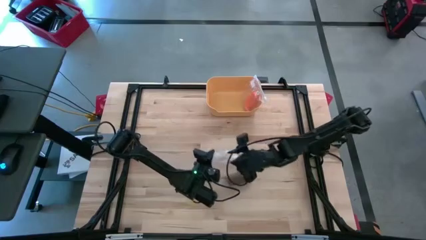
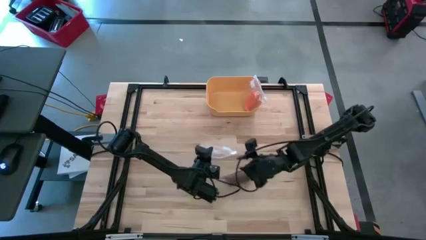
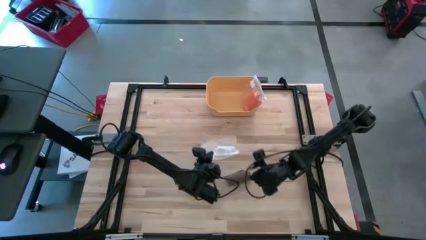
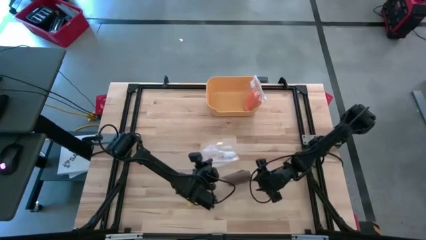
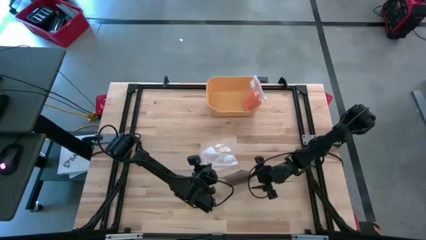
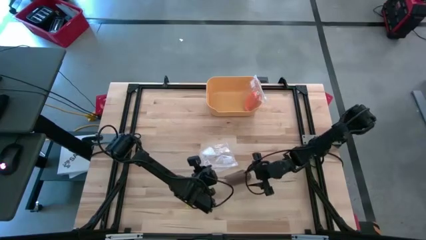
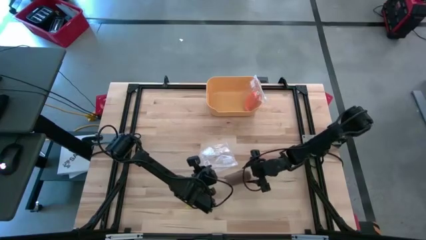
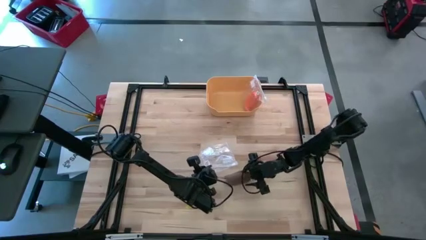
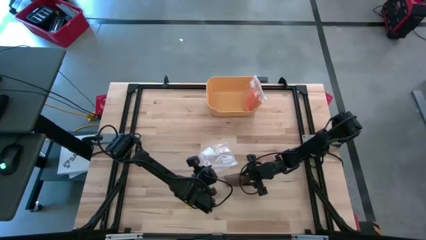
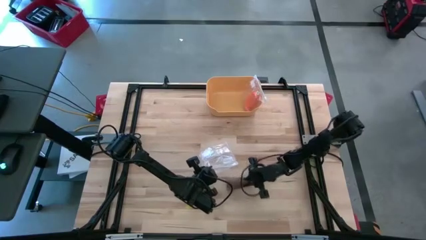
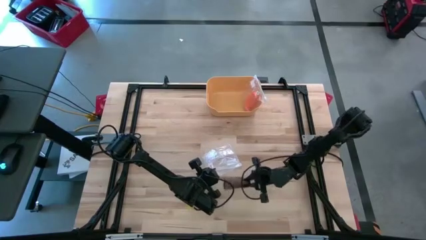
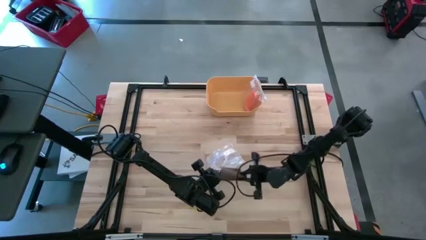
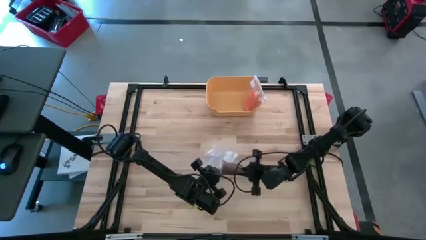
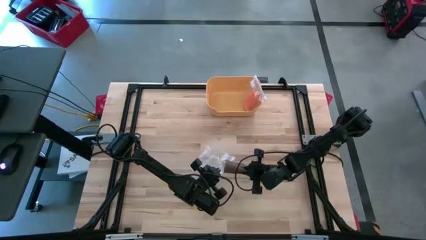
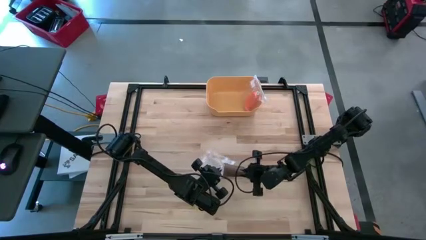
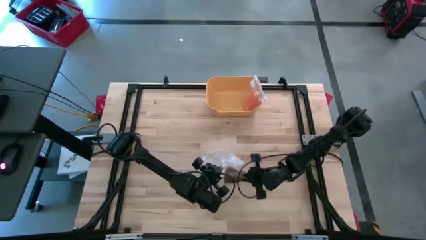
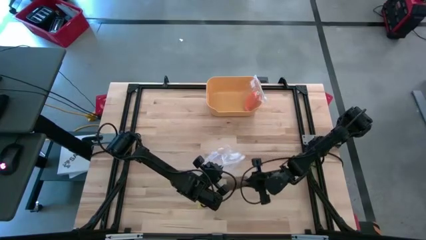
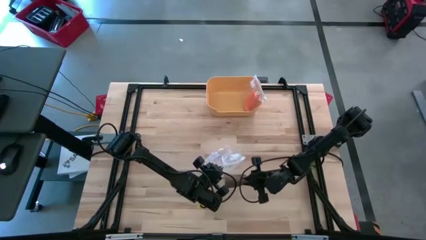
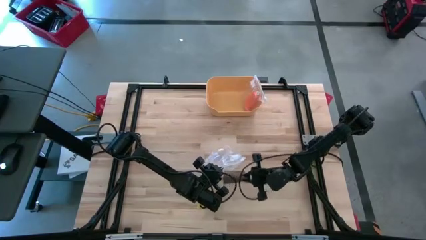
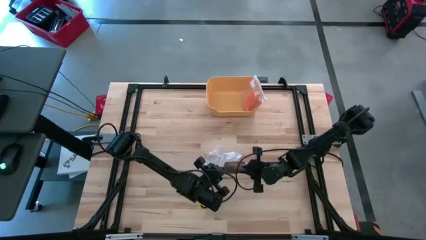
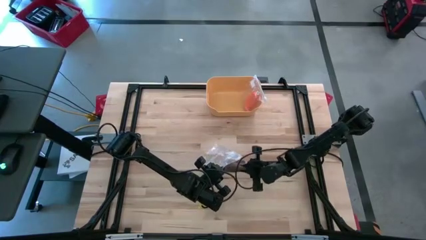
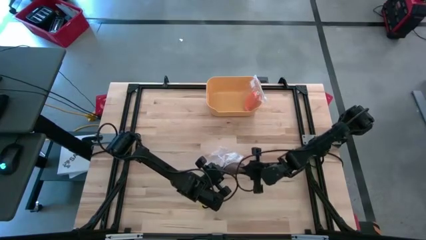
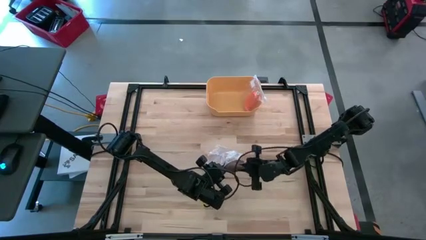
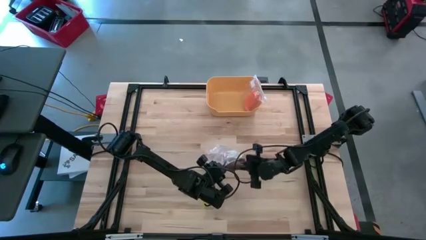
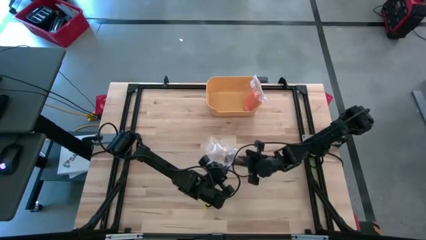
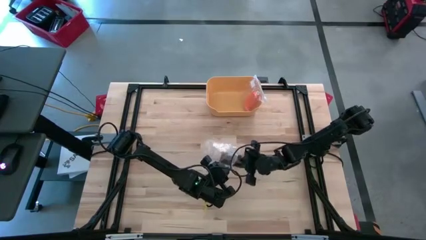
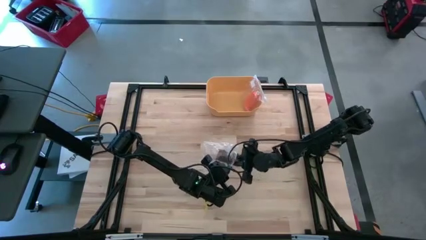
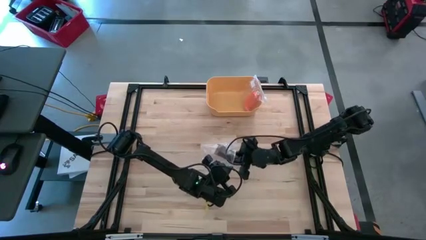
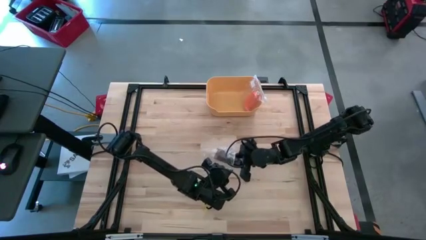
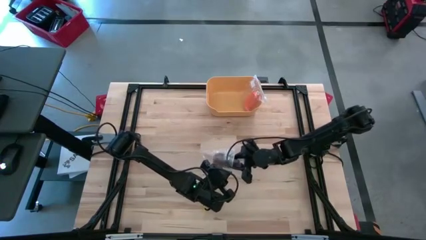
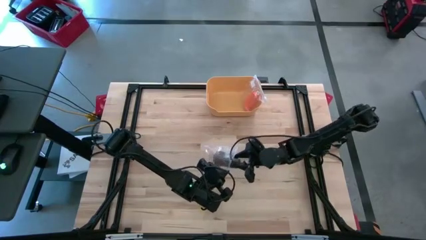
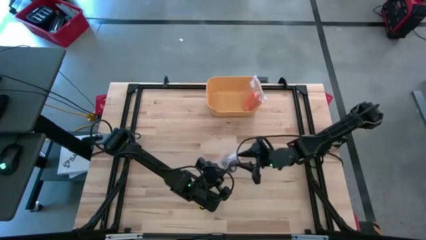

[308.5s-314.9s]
Task: Roll bandage
Put the brown bandage into the transparent zip bag

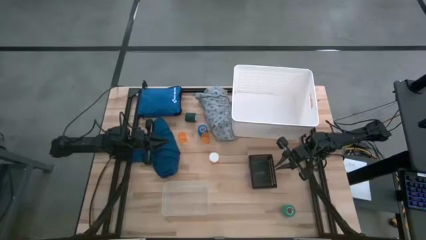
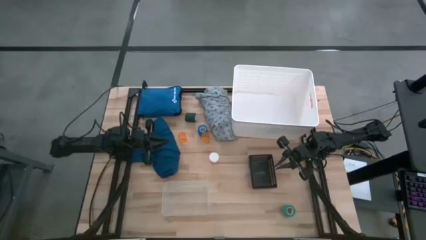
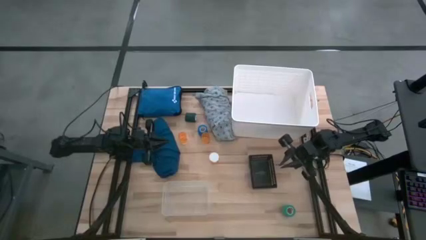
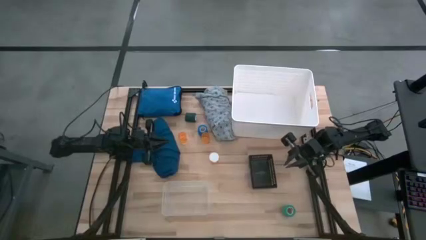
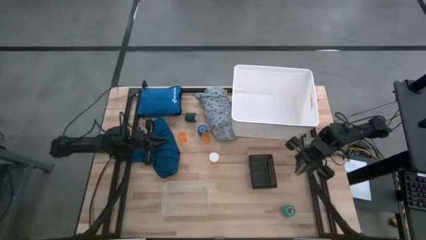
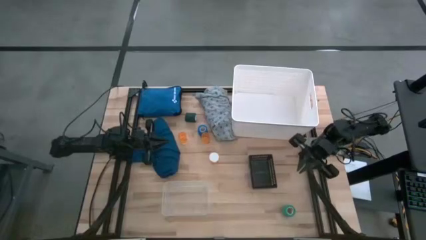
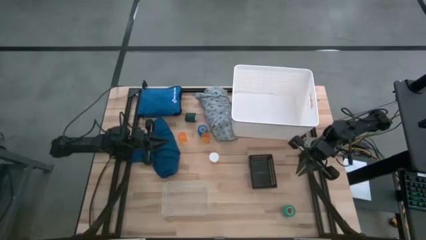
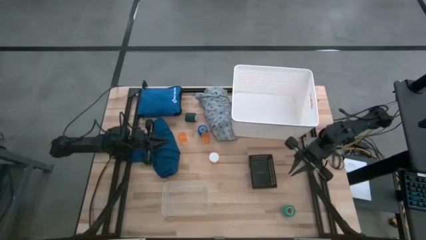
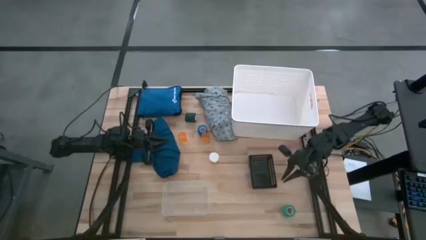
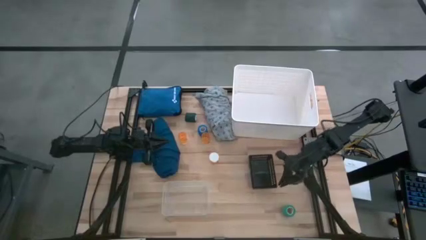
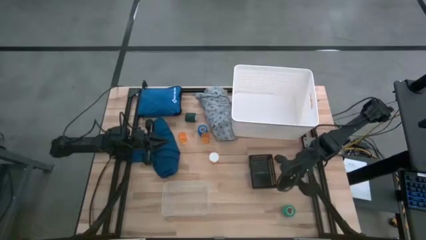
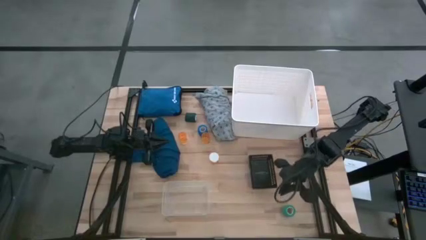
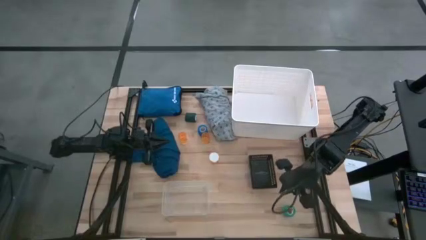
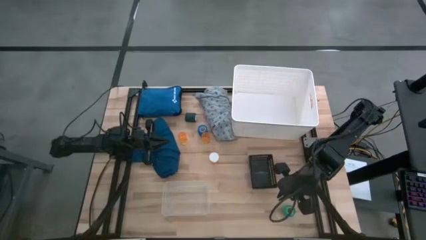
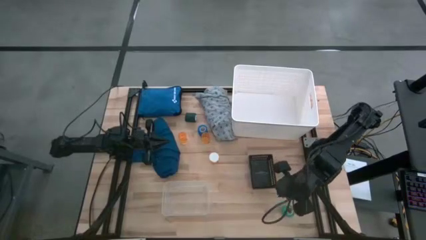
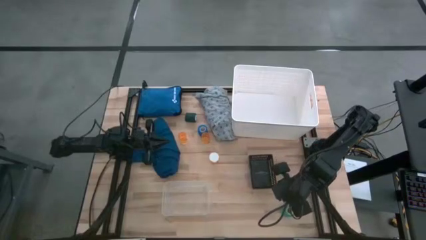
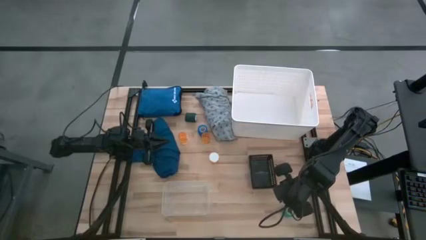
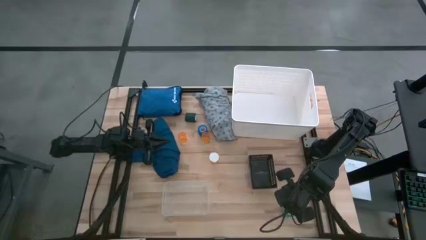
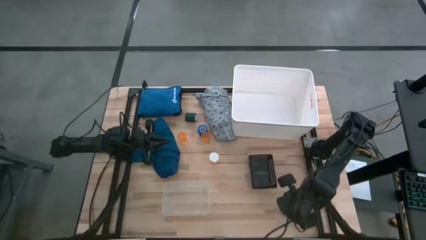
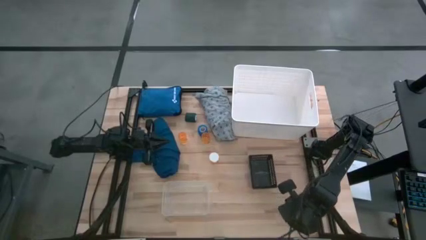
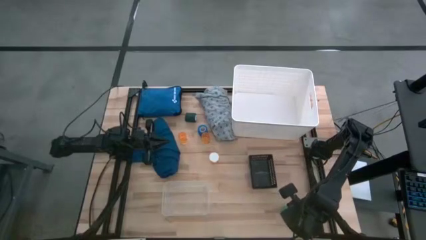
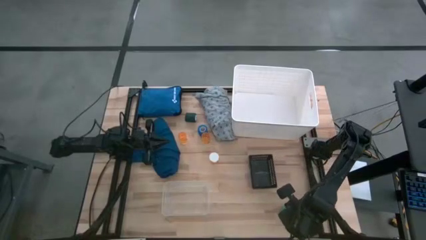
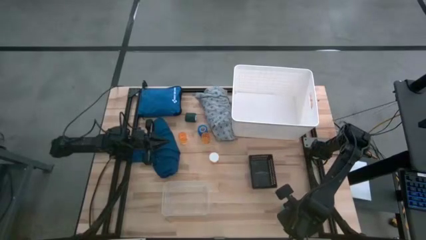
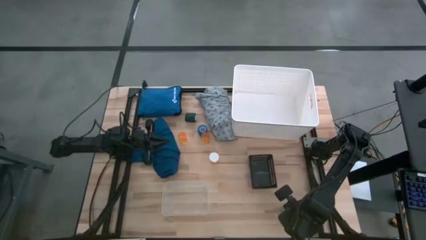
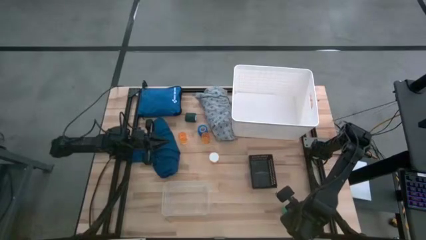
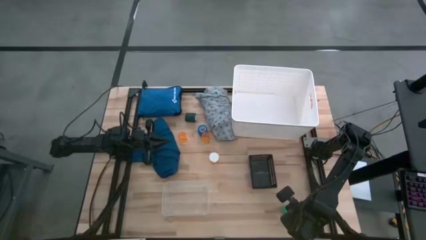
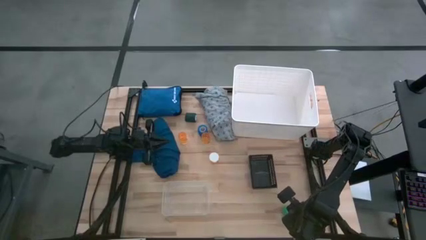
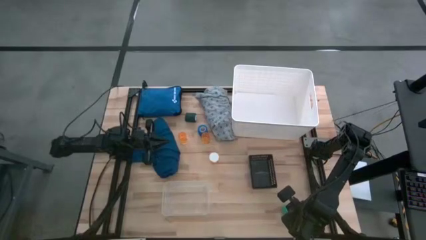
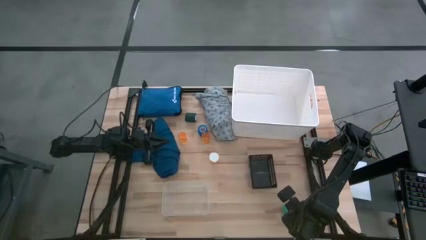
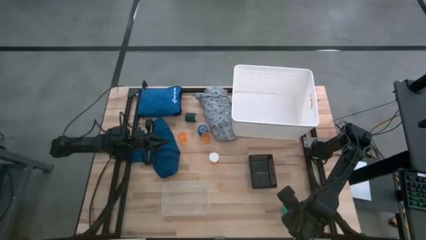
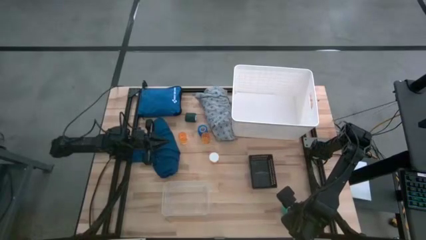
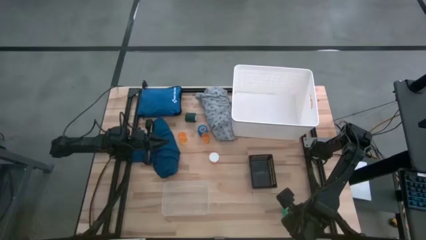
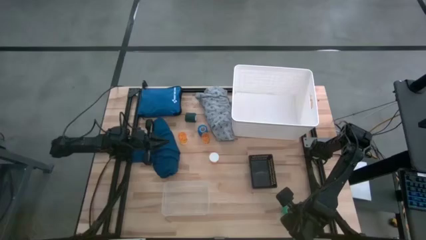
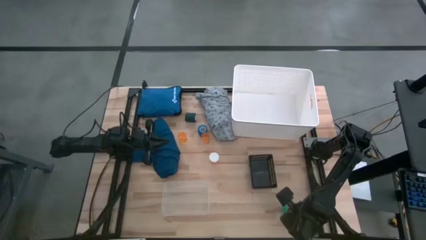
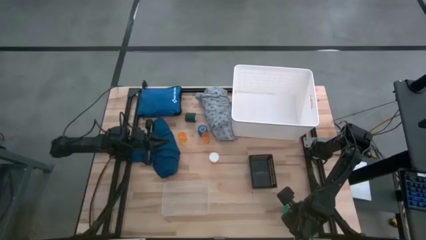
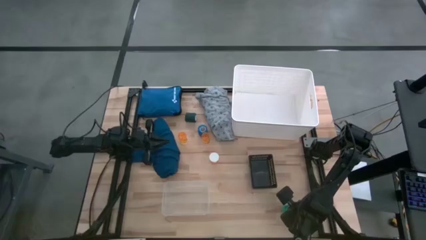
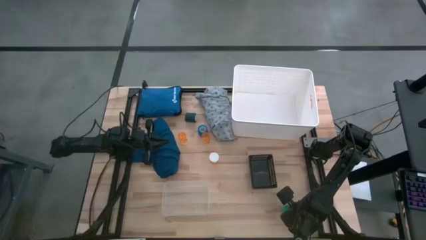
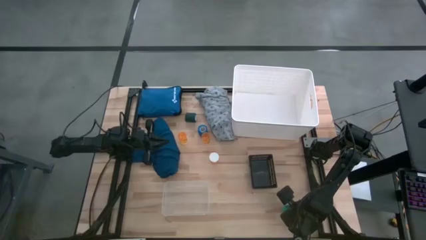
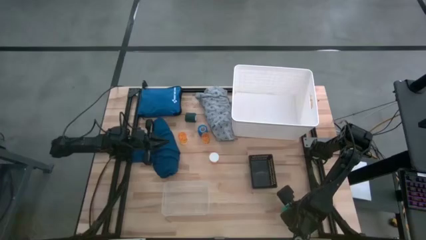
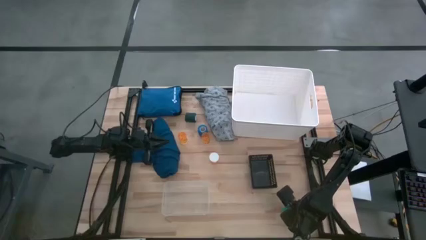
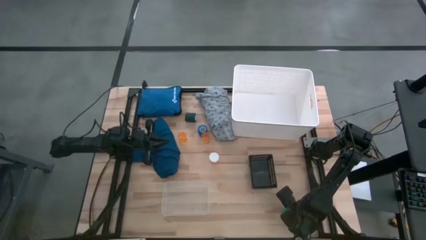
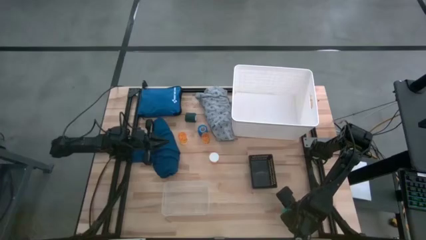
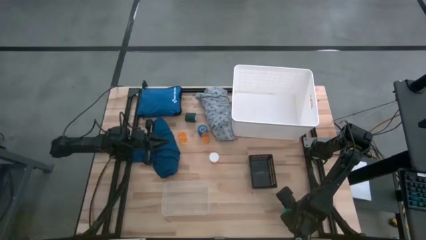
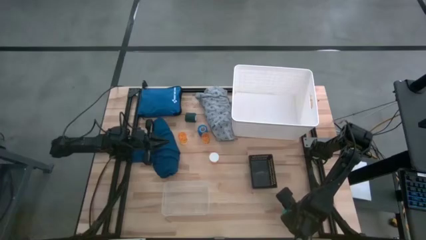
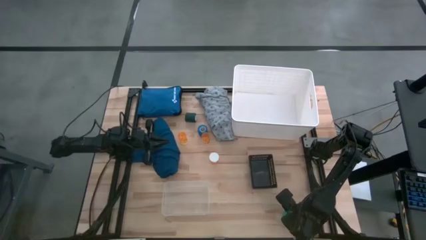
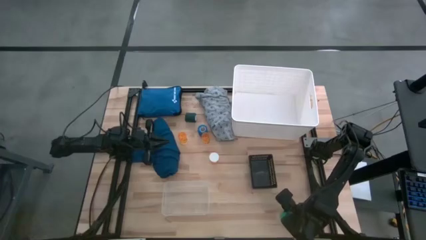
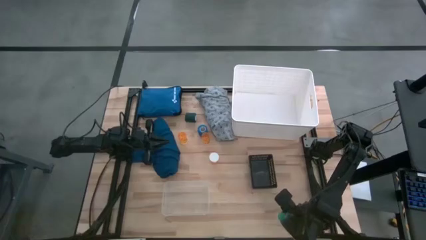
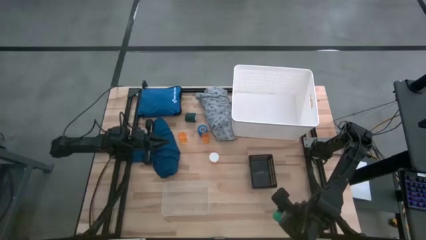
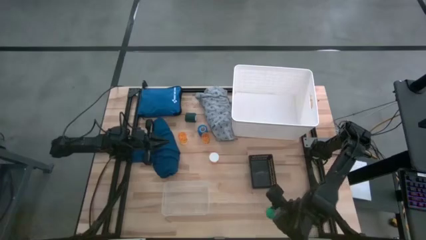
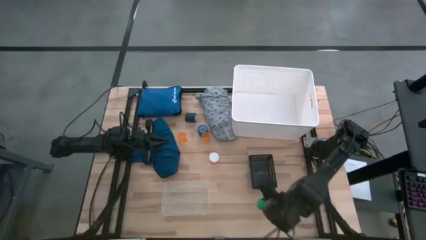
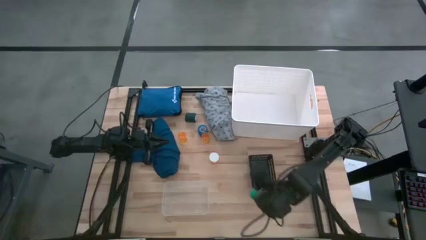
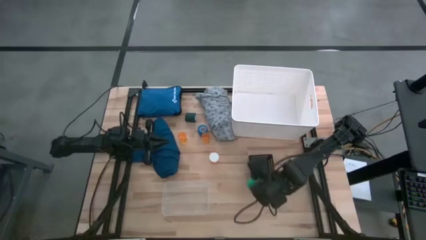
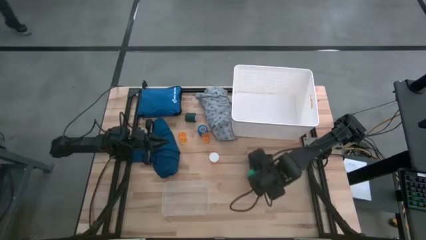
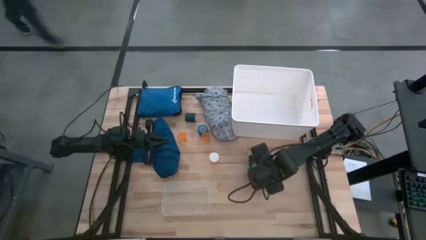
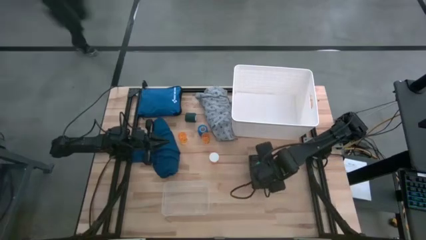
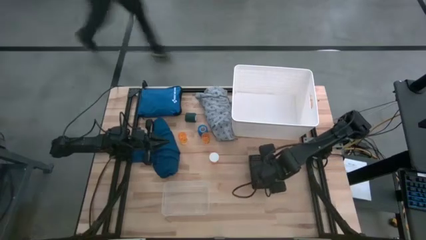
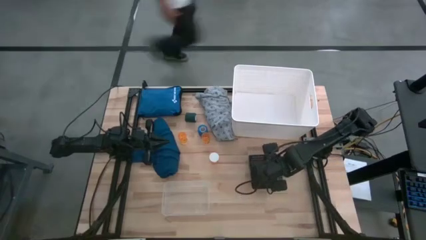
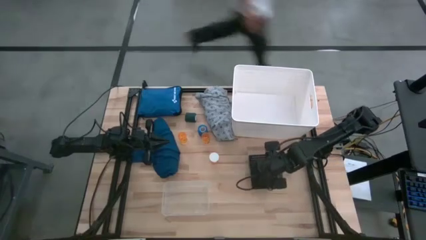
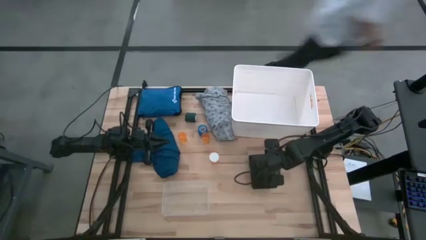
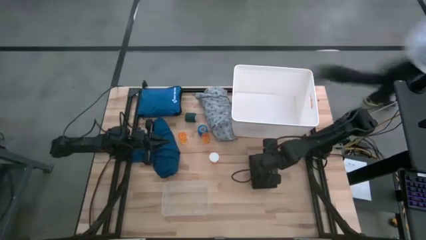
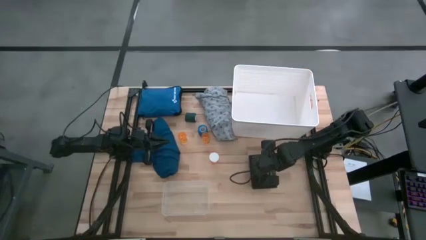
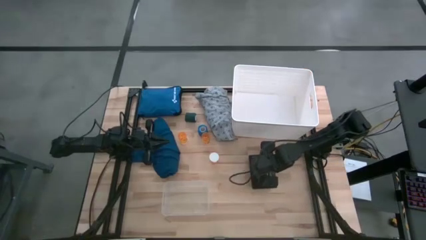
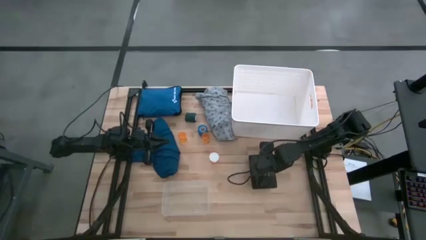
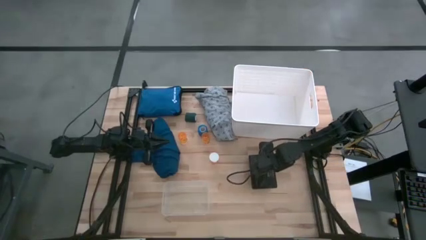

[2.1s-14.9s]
Task: Pick & place medical supplies in basket/bin
Put the bottom green bandage into the black bin
